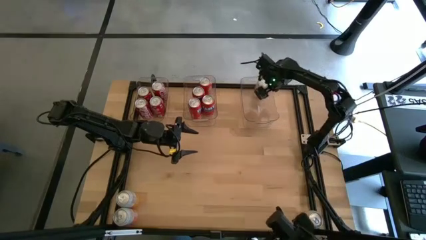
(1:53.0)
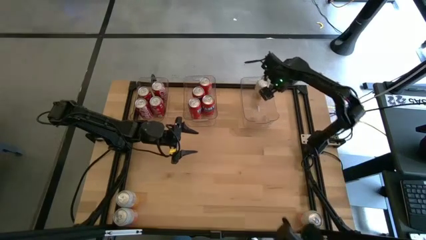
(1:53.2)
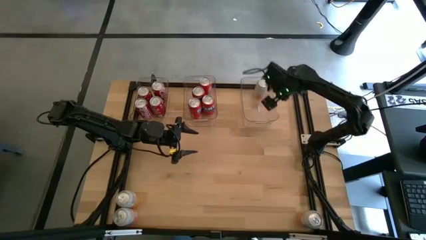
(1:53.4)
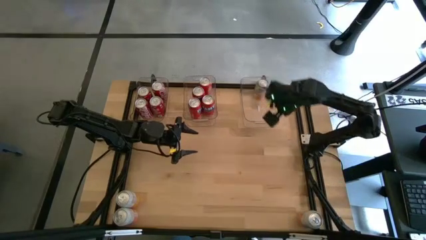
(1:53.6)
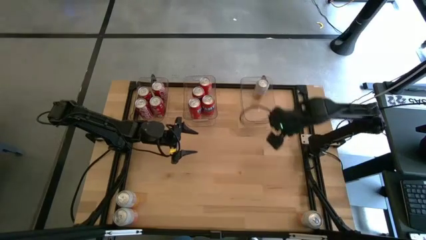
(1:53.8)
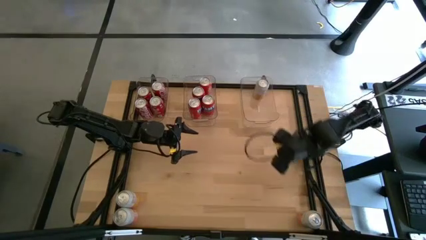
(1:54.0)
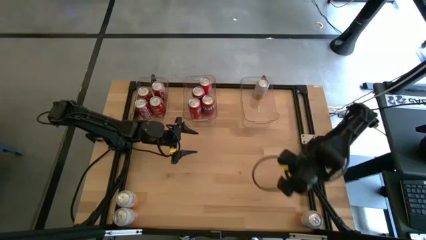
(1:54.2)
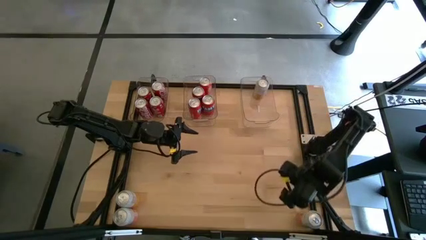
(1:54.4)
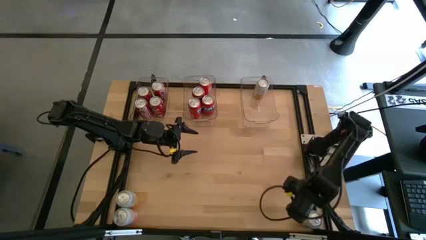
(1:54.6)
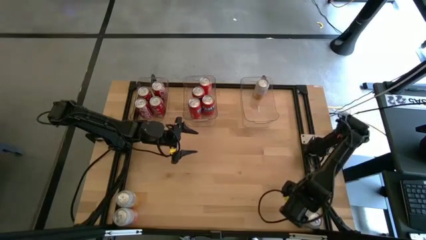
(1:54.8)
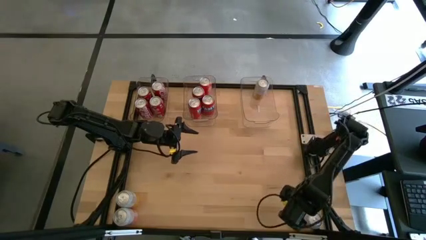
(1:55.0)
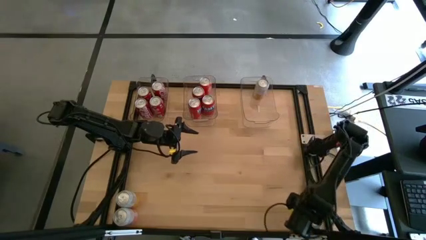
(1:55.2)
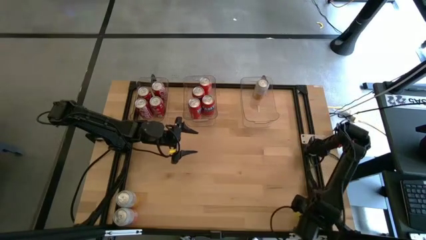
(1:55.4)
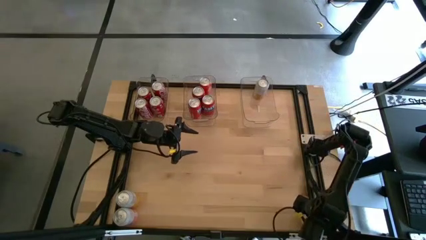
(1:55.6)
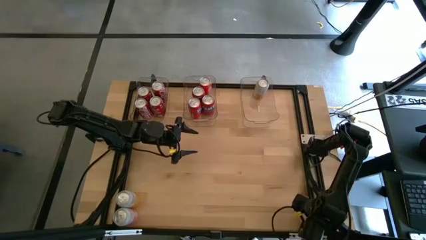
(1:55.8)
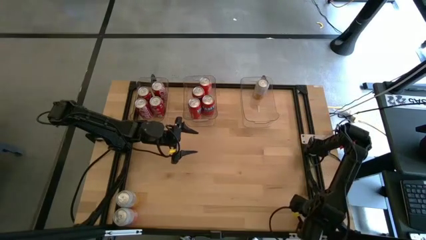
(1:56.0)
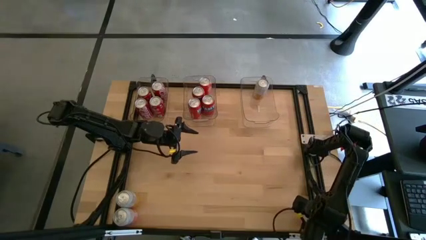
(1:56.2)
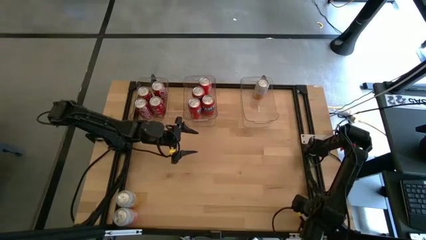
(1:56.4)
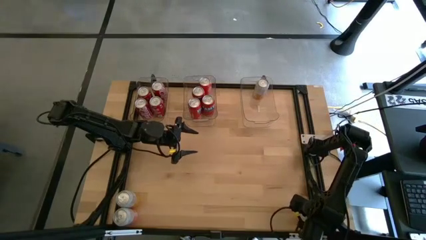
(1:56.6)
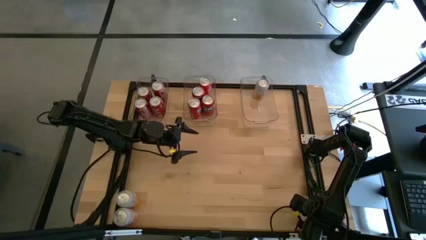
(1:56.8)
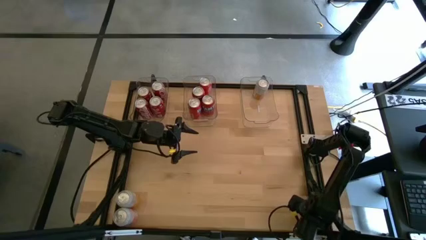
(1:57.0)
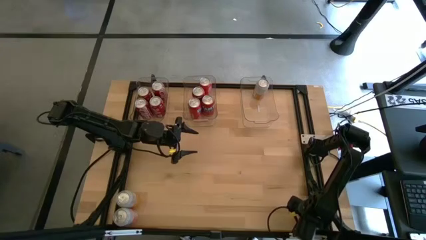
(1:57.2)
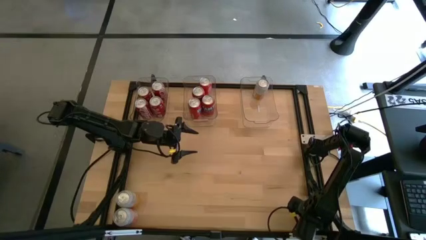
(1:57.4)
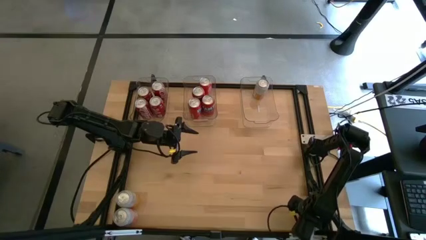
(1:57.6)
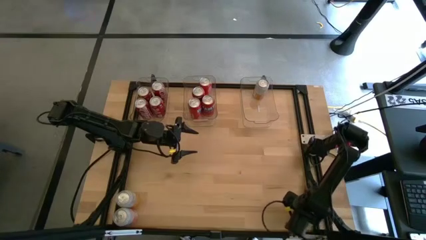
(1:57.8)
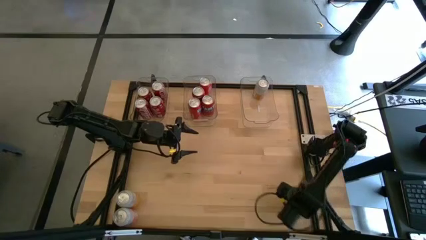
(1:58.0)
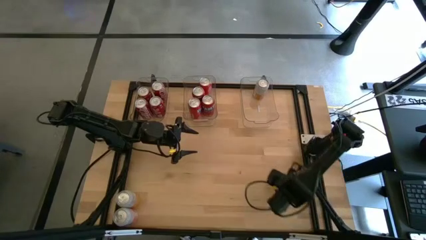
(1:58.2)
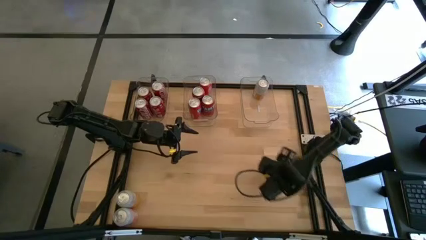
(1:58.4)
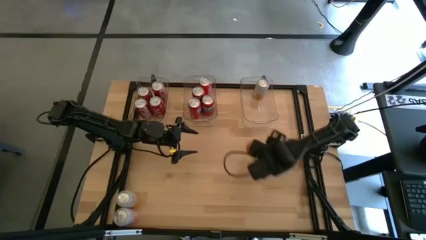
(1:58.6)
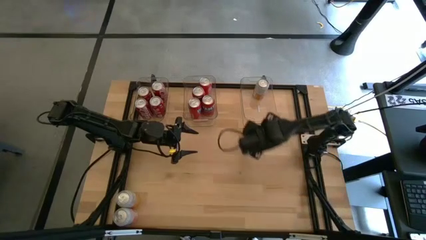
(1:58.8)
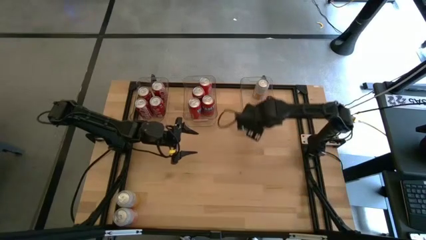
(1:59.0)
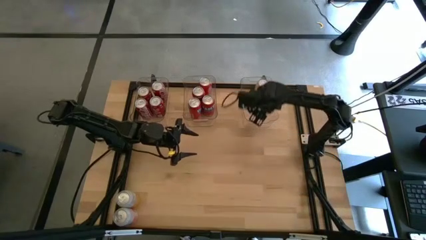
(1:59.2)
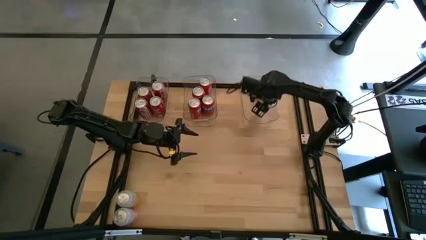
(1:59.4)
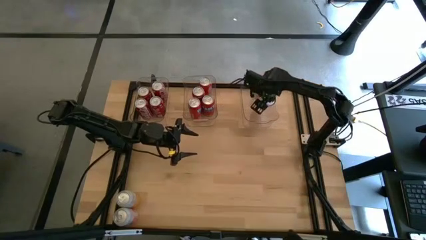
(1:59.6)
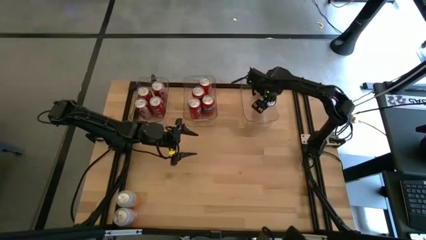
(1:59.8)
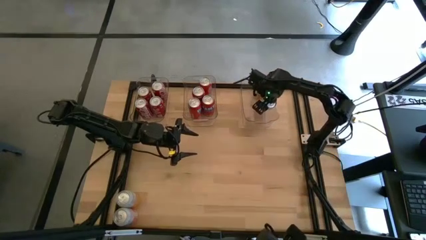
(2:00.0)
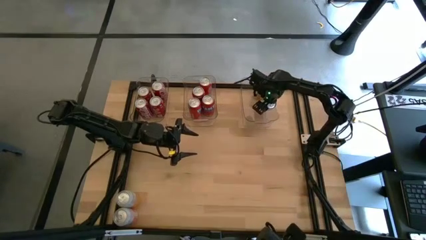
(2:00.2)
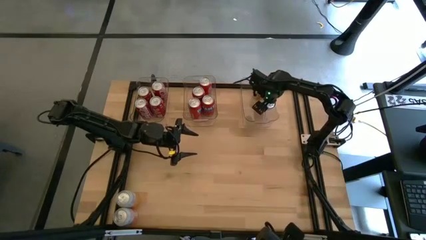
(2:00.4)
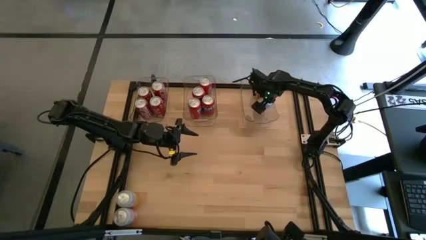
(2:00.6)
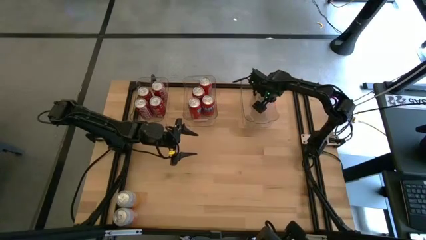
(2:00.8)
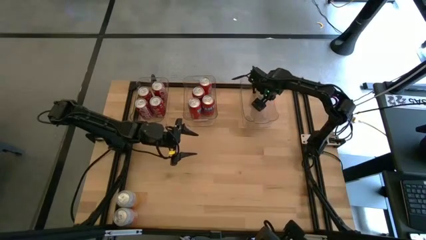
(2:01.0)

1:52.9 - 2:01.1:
Task: Sort soda cans
Put the white soda can into the right transparent bin

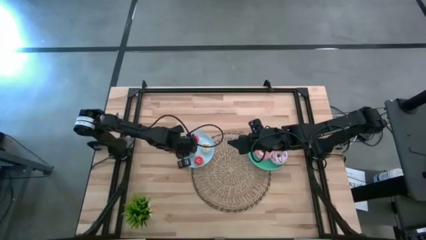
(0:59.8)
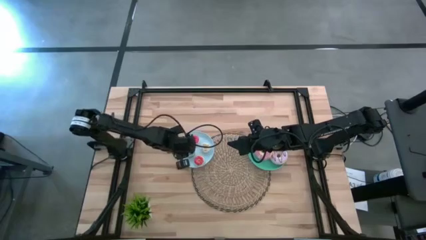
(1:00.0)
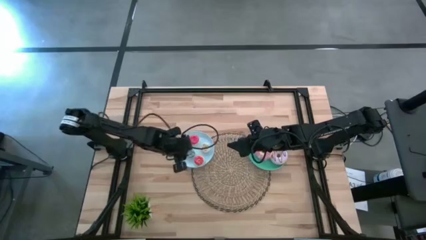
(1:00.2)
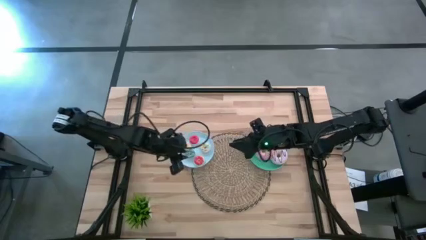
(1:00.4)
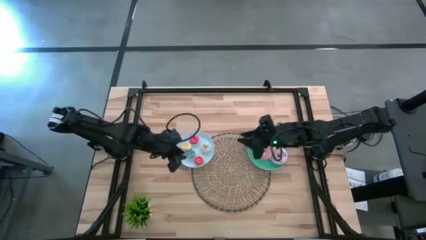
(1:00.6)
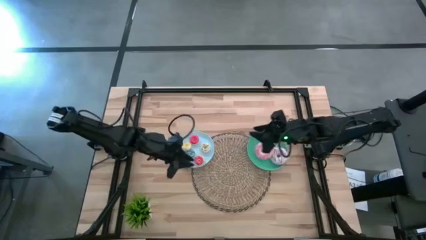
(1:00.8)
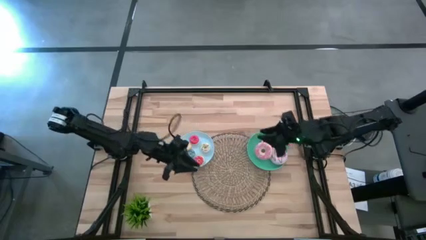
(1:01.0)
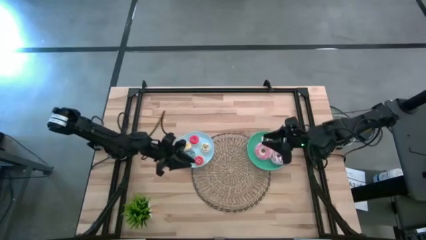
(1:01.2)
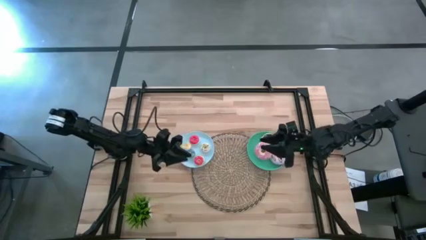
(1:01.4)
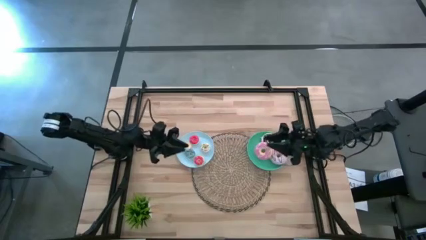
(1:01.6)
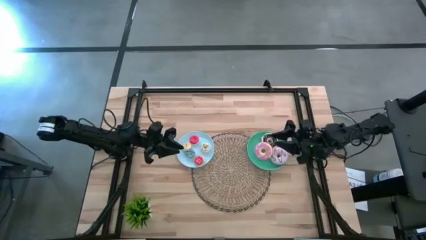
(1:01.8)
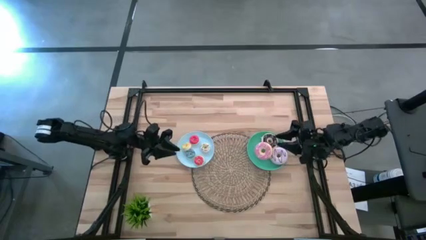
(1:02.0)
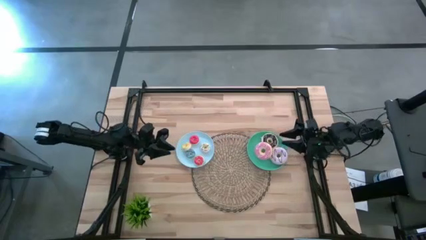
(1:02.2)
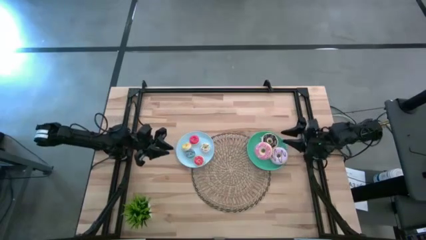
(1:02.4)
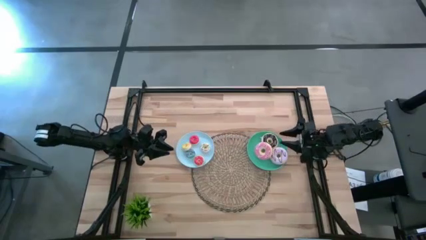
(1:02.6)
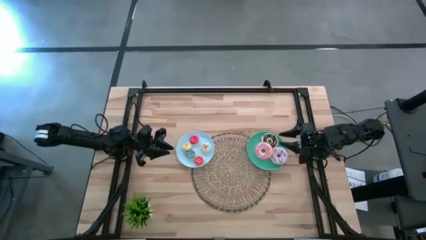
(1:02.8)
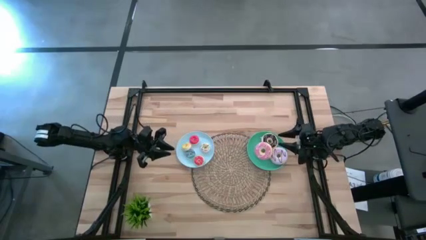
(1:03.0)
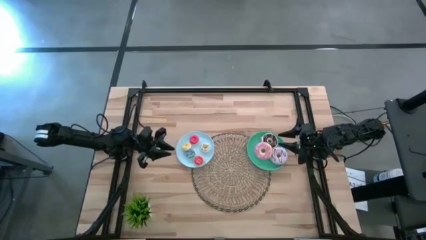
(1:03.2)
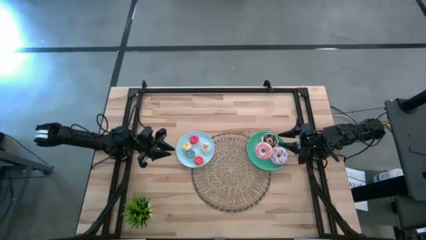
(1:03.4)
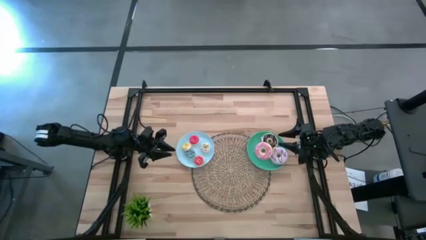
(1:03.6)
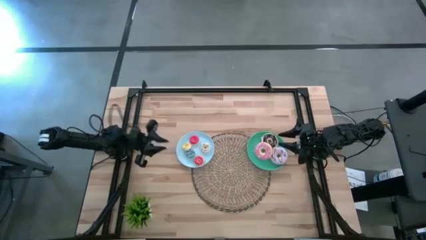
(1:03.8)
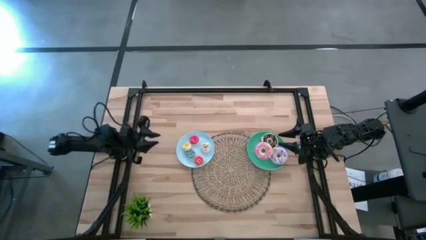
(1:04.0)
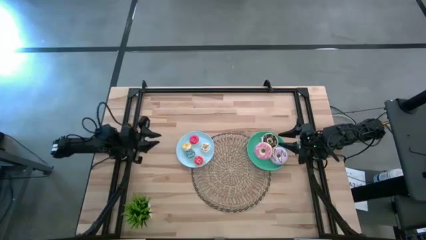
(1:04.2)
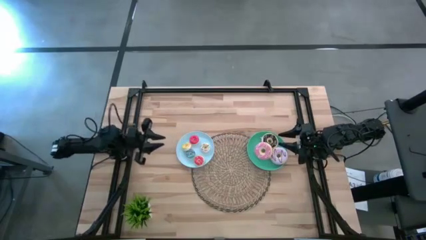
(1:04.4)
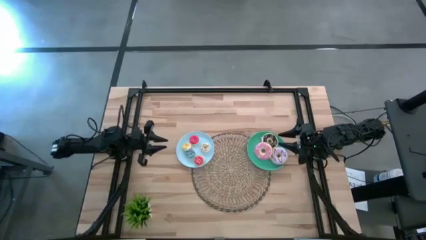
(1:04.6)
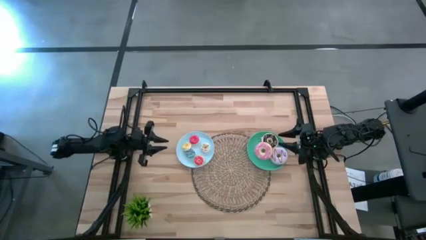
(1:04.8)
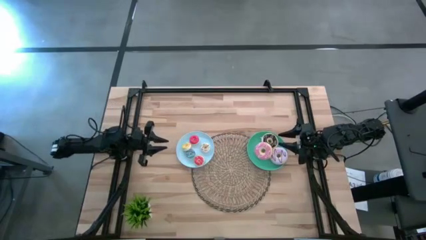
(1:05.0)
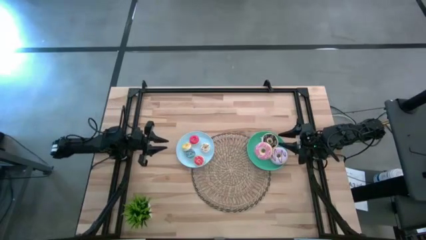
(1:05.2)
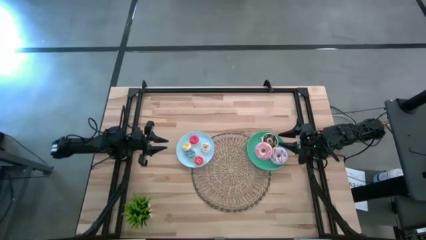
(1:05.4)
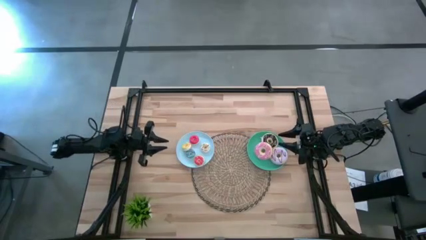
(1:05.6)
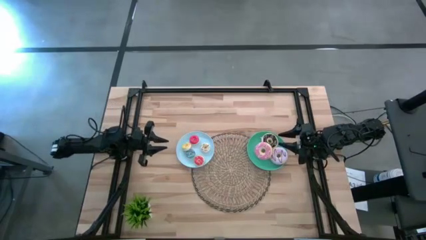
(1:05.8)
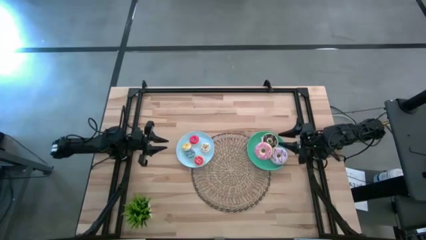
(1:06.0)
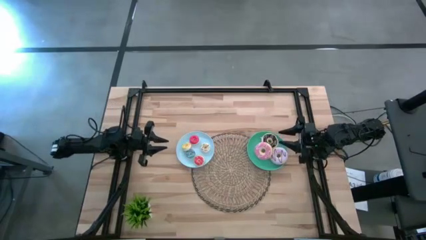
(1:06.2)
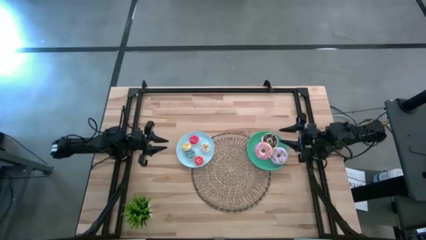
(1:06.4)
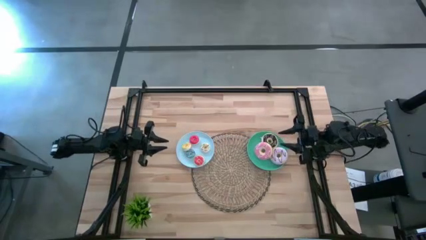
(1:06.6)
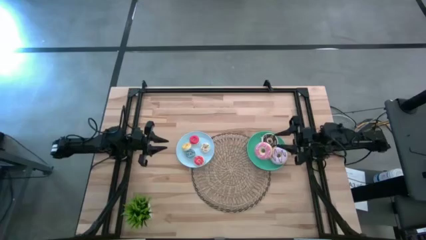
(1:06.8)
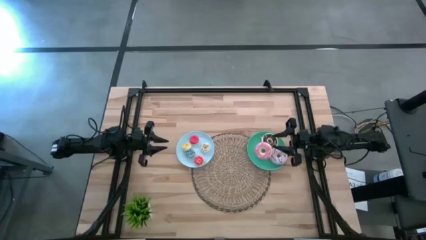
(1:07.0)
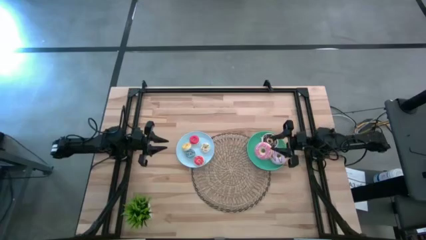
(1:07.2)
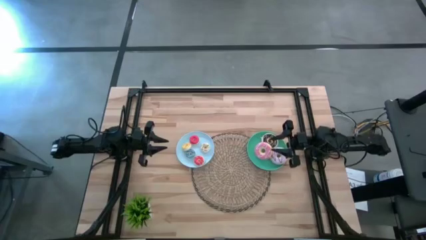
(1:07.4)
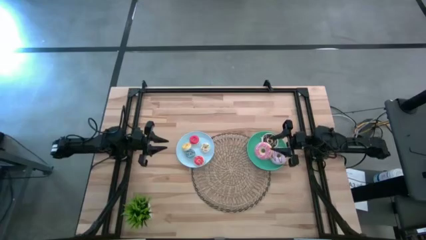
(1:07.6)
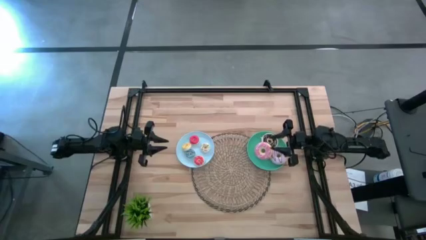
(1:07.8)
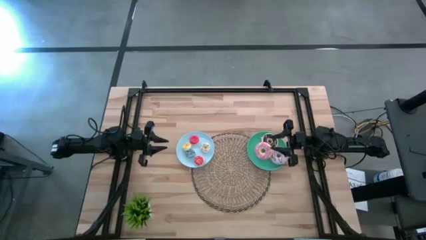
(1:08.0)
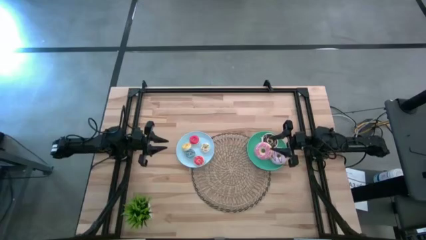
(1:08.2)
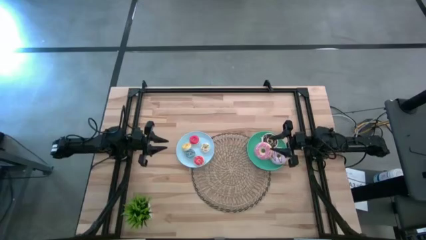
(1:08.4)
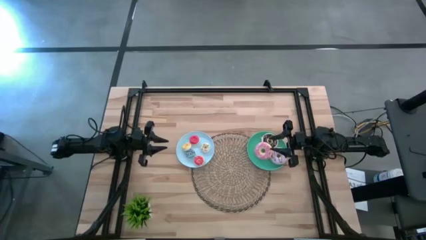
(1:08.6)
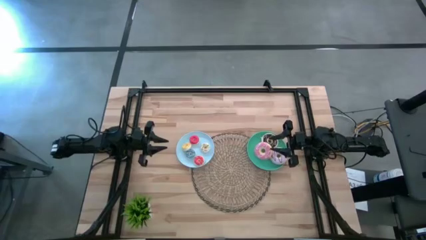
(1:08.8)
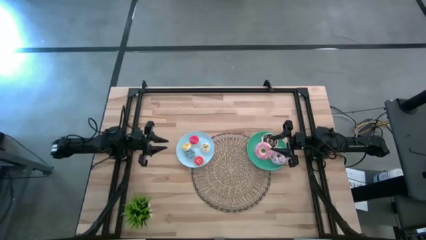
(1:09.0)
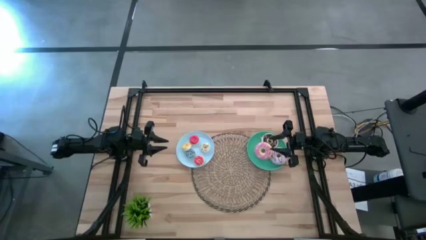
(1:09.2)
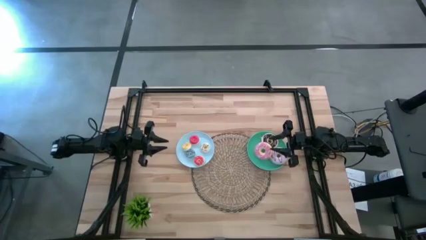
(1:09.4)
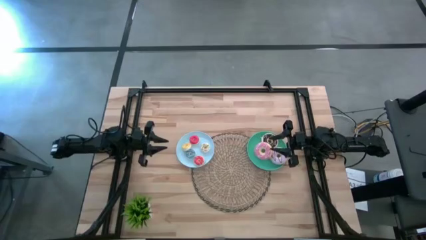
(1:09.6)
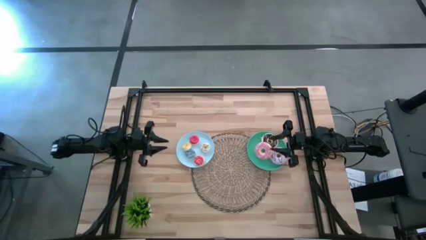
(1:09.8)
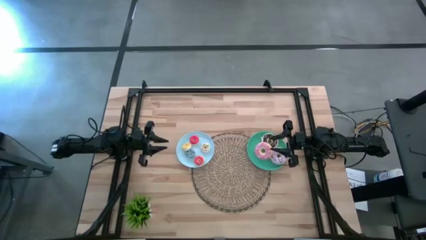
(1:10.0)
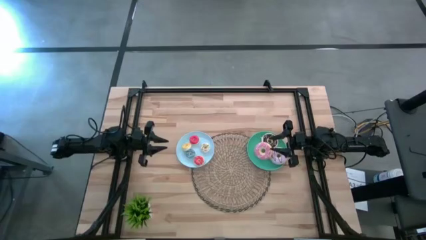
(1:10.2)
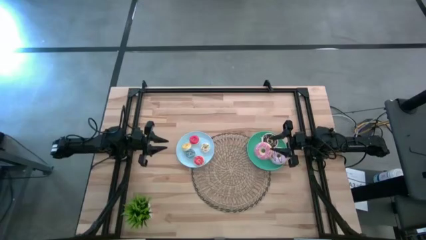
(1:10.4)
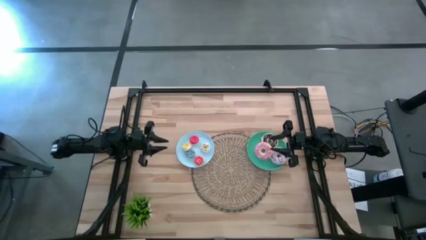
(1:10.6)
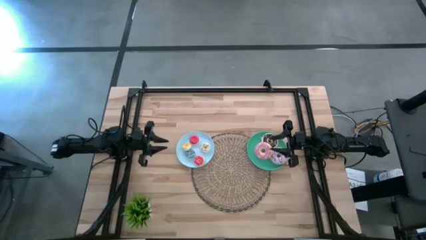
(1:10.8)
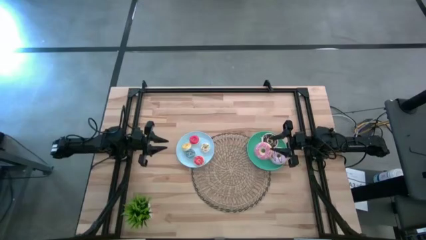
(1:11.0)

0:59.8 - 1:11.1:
Task: Pick & Place donuts
Return to Home Position
